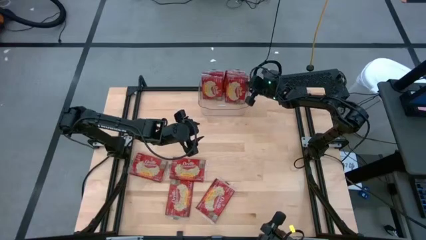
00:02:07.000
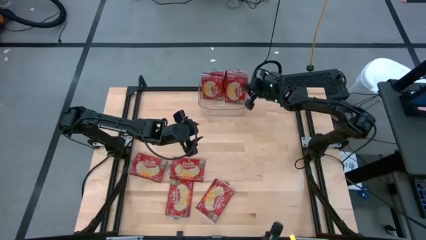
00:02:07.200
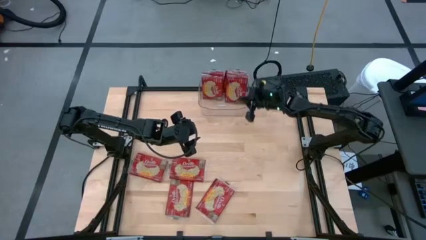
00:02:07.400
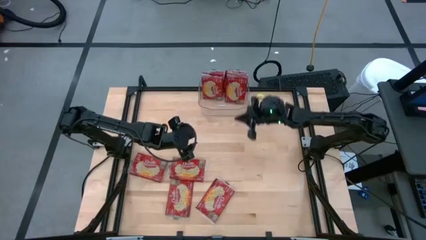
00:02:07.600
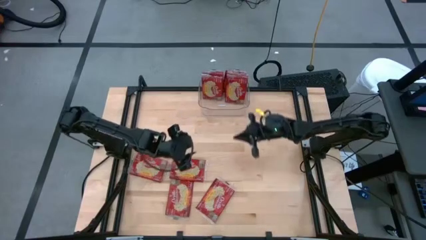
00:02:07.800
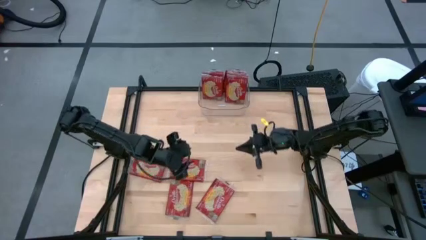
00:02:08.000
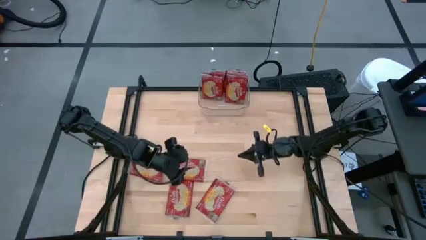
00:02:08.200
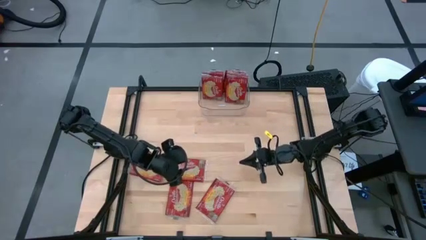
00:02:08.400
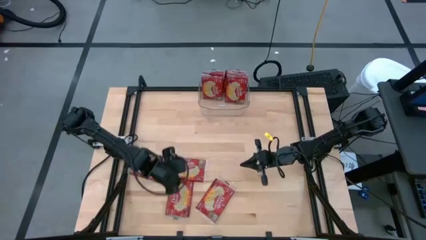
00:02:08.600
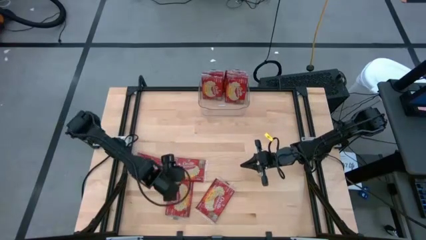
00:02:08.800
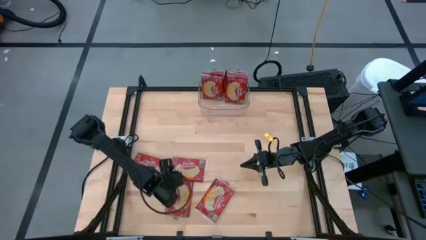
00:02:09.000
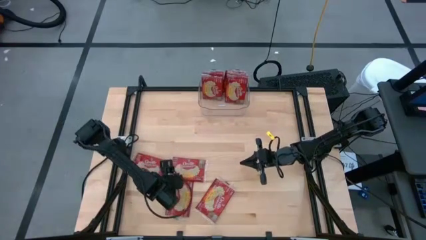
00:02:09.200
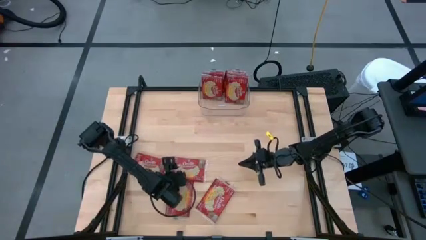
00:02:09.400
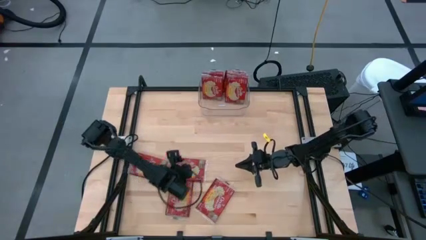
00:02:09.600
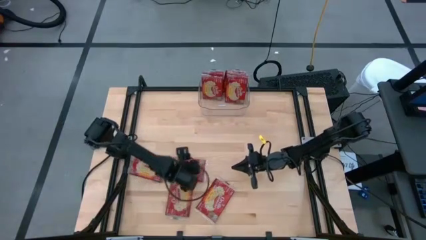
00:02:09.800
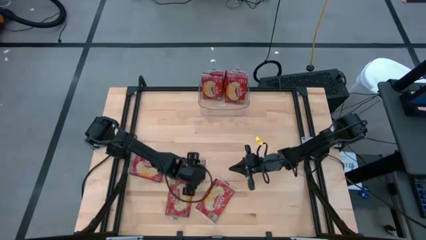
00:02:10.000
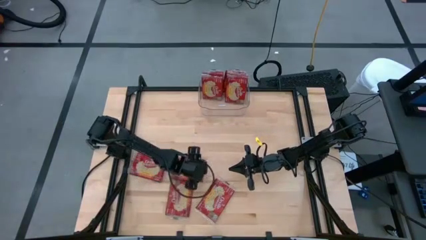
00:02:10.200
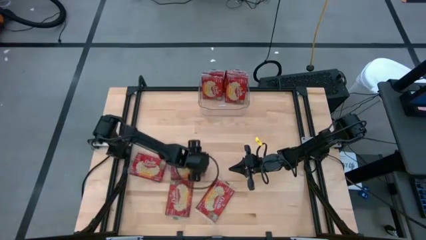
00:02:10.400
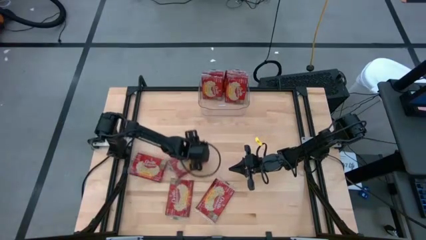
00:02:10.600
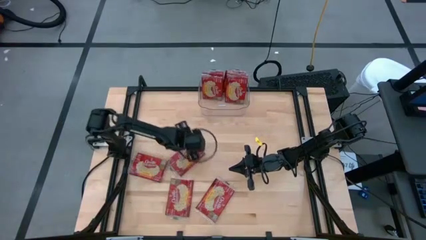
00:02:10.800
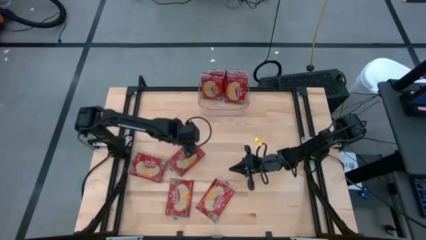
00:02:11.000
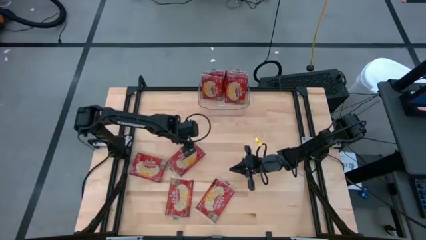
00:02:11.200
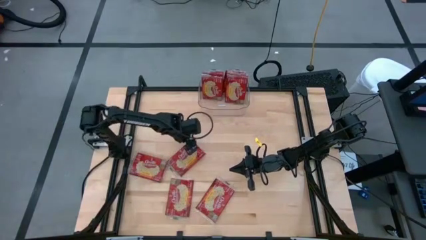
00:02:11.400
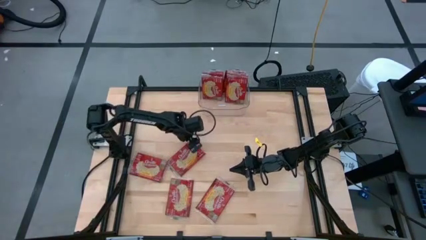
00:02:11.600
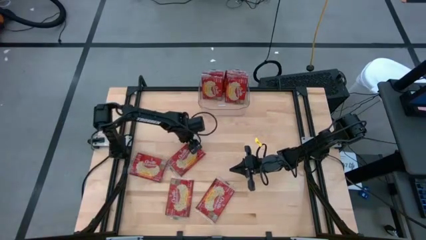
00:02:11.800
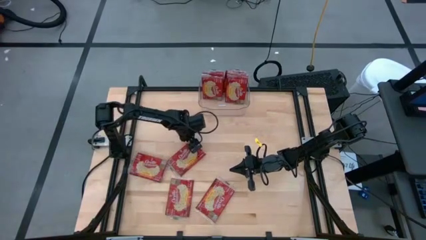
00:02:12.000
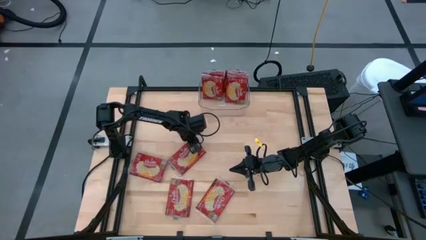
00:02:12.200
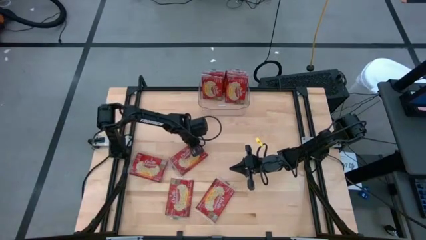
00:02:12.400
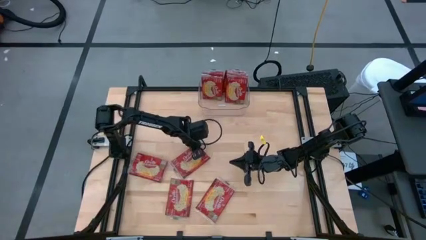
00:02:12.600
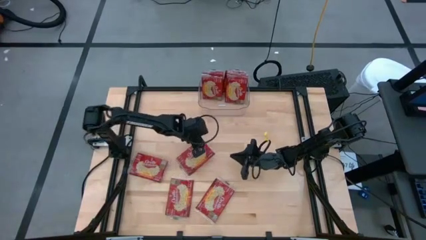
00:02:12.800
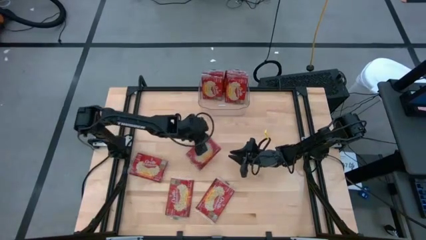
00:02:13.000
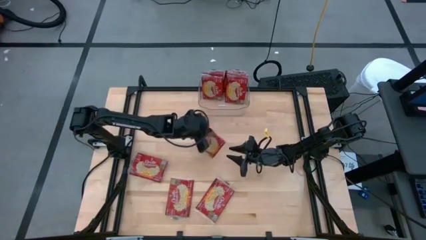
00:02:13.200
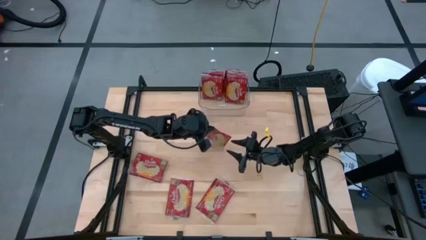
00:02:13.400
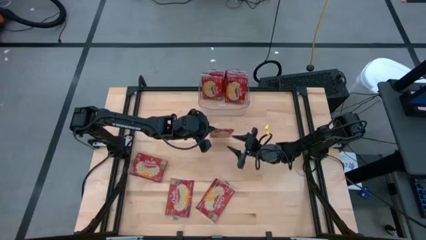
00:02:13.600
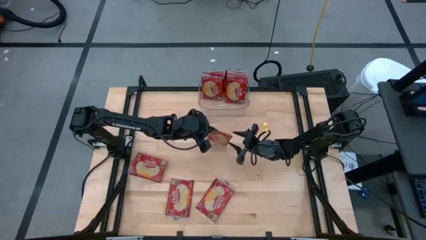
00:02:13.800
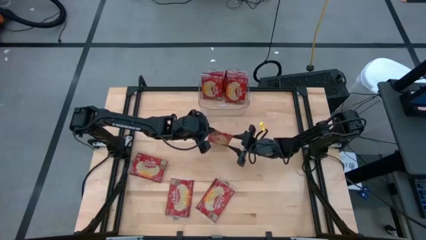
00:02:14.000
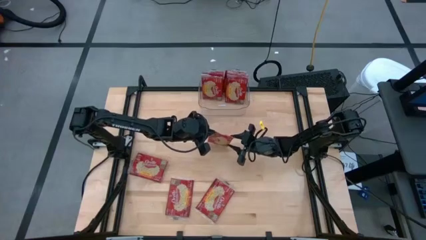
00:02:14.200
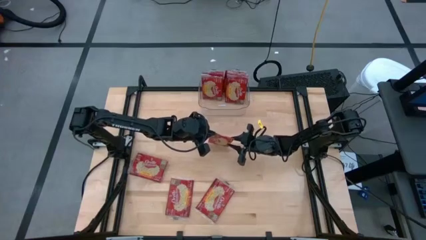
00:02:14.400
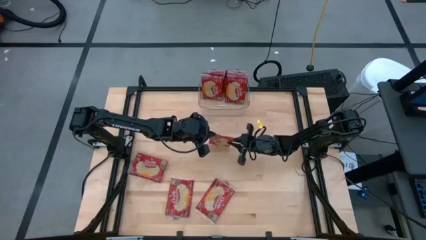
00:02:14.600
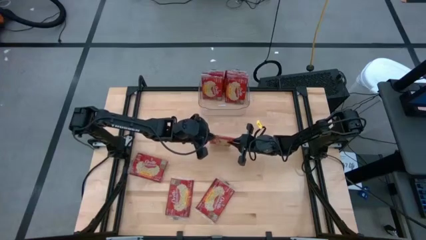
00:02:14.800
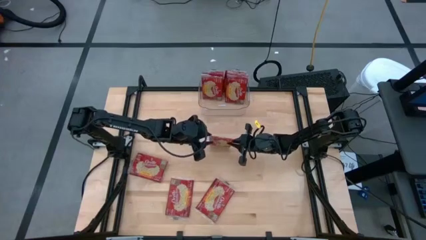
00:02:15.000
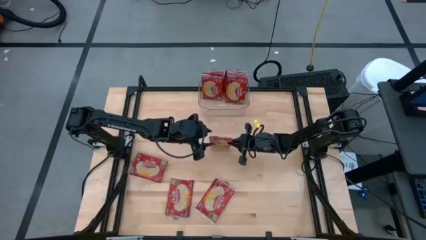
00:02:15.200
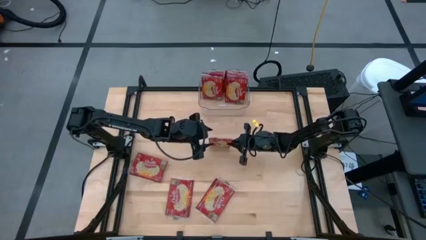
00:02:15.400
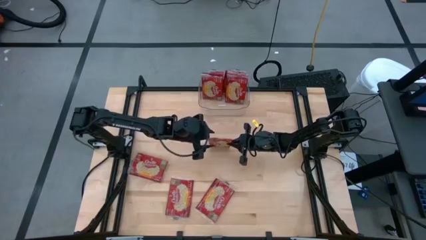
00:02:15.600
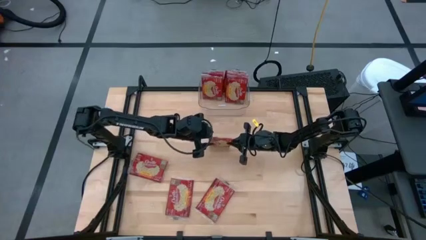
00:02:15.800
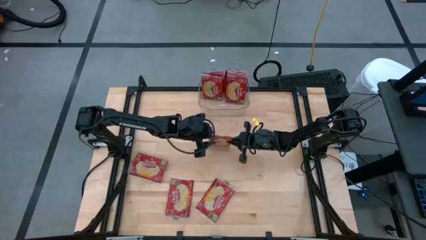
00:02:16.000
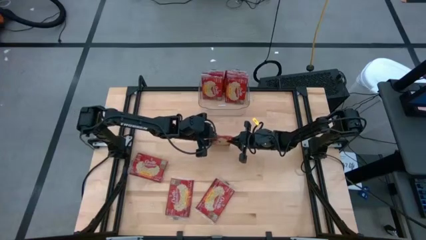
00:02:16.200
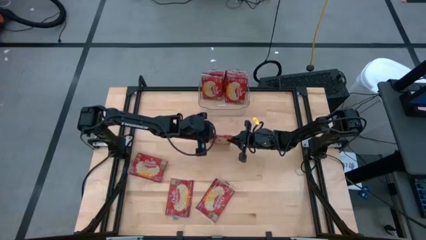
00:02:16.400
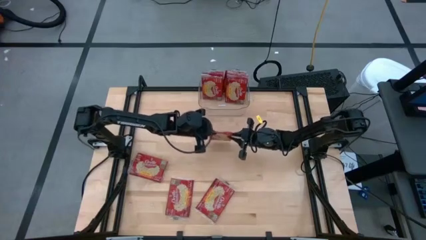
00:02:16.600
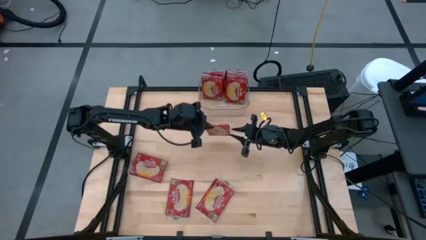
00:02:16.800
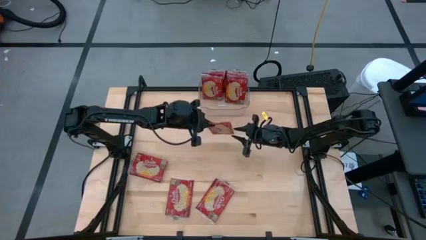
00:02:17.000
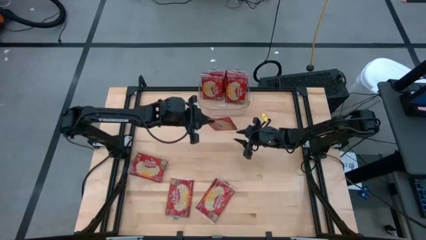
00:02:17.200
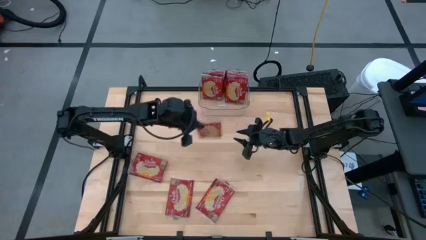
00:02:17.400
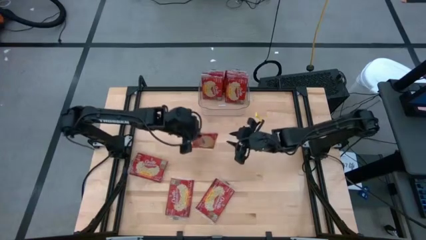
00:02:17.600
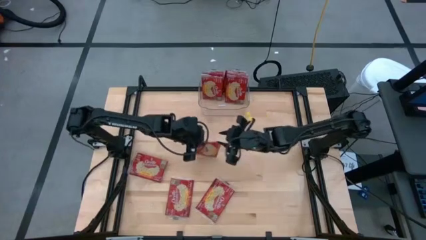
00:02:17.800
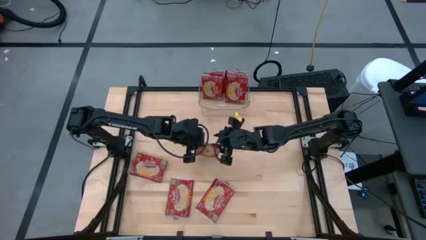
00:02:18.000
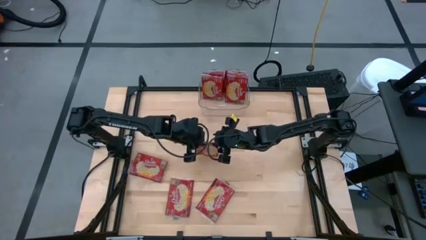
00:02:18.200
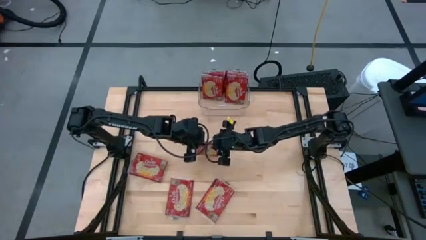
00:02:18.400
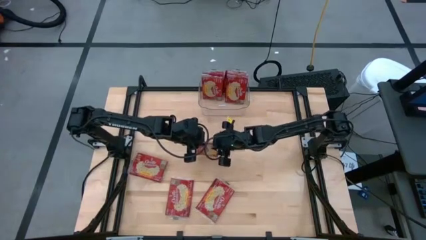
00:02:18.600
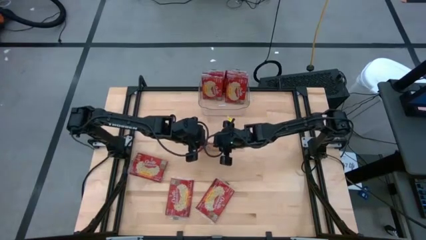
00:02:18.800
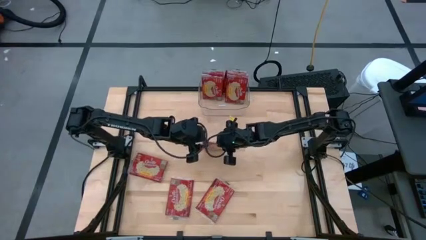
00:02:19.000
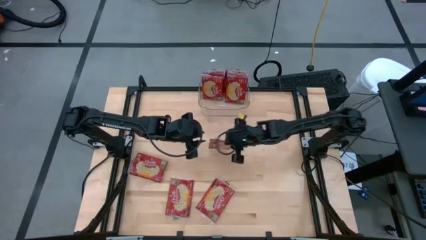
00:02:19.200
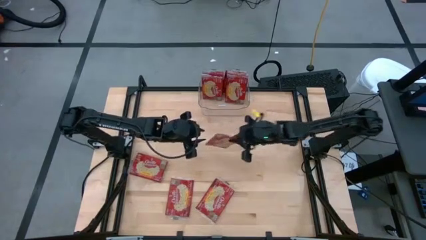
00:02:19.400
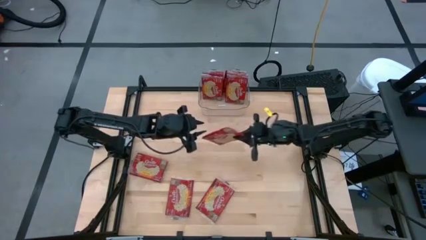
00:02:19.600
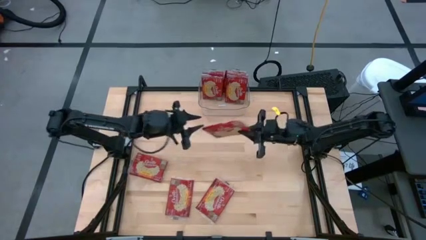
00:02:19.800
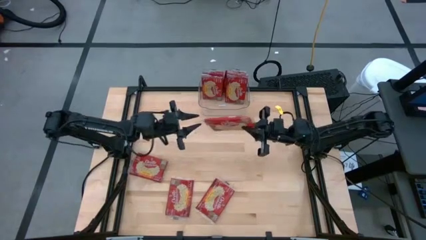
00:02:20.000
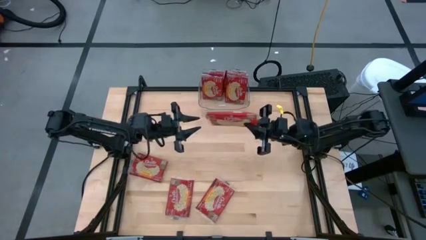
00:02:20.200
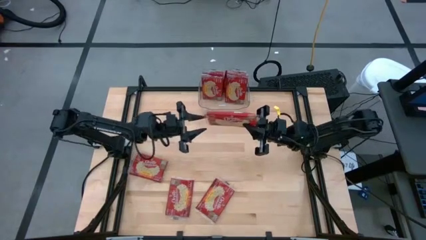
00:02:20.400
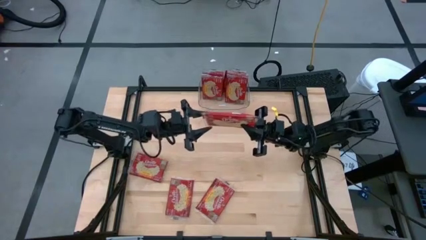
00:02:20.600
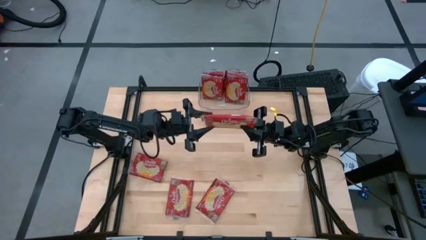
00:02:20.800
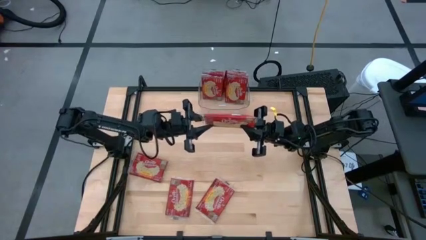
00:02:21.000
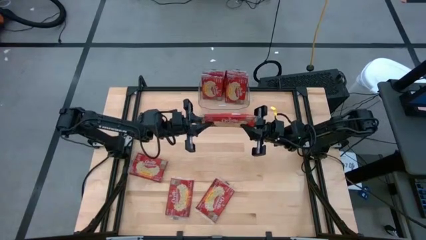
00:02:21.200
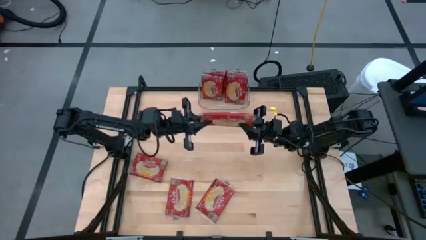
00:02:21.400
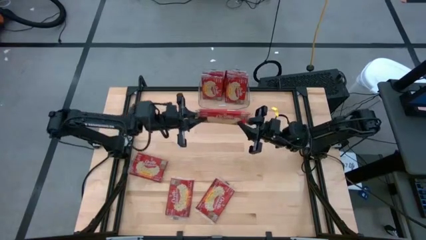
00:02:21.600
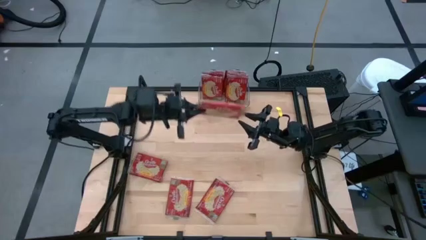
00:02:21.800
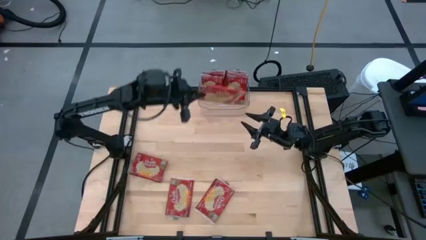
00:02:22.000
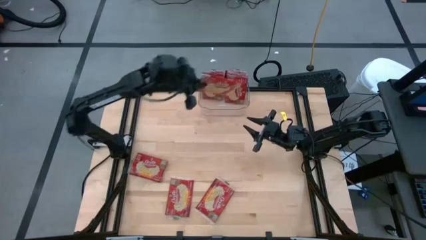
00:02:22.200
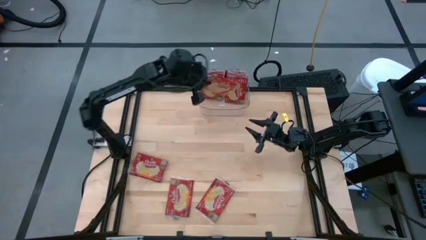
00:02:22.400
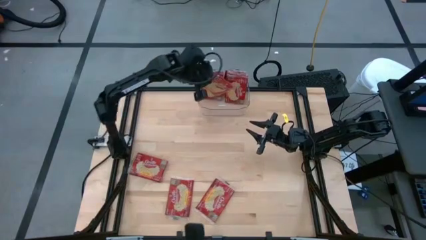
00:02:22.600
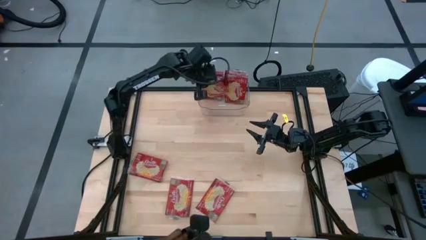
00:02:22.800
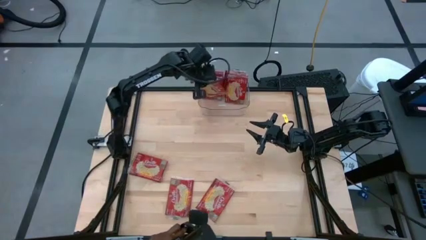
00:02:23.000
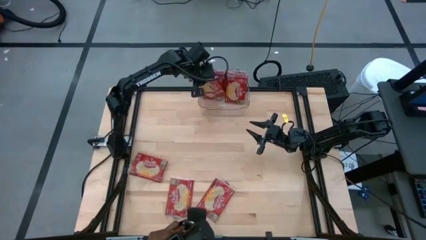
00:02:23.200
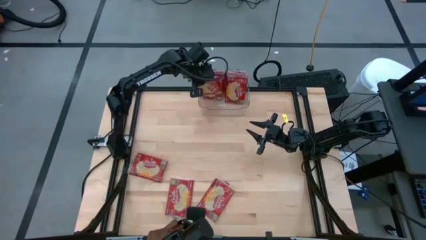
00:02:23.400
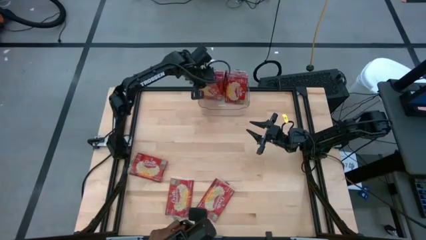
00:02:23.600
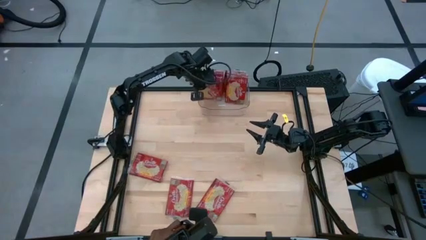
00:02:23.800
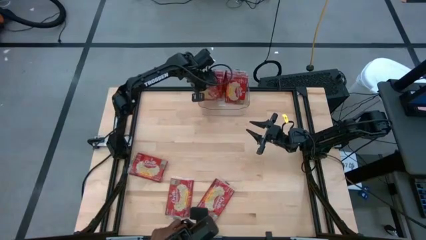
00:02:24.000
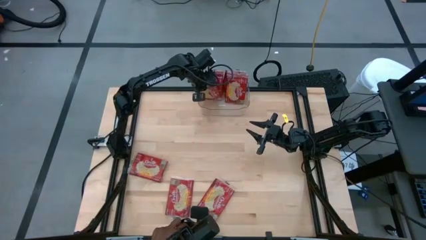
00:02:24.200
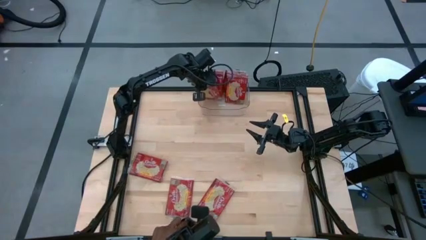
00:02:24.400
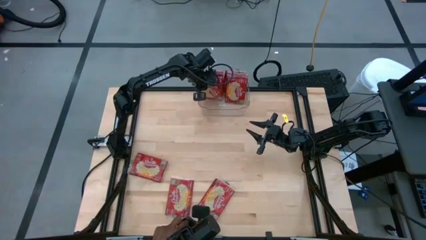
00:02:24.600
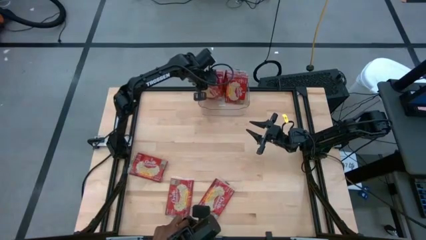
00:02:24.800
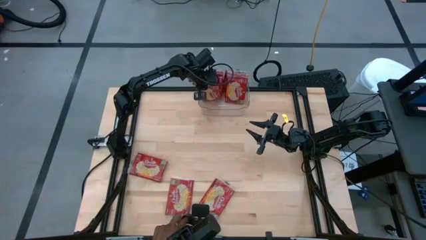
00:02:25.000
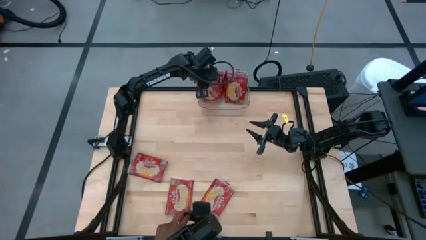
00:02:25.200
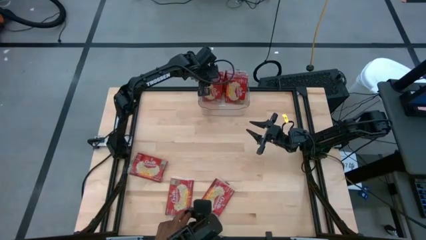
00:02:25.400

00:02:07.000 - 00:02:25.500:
Task: Sort popcorn bags into baskets
Put the red popcorn bag into the transparent bin
